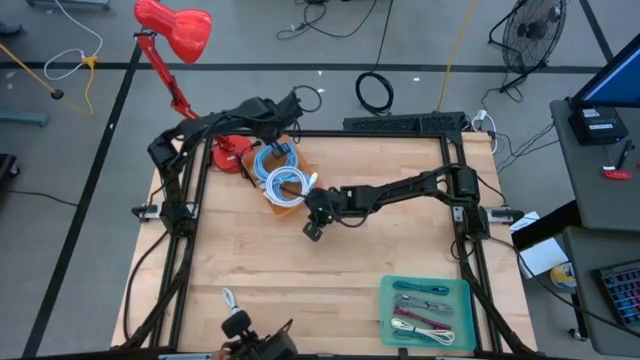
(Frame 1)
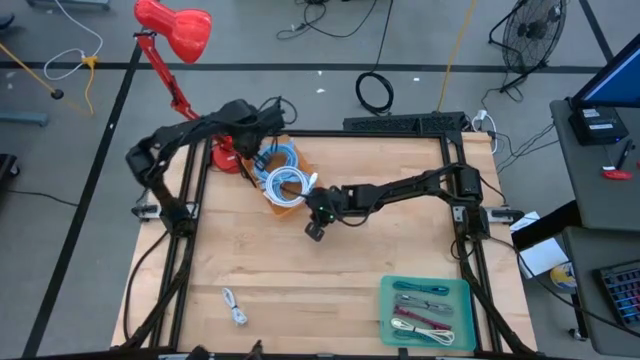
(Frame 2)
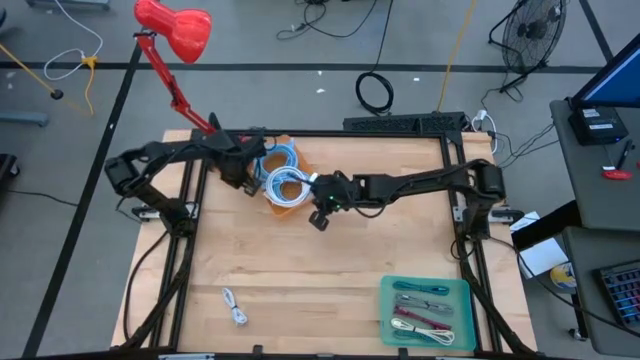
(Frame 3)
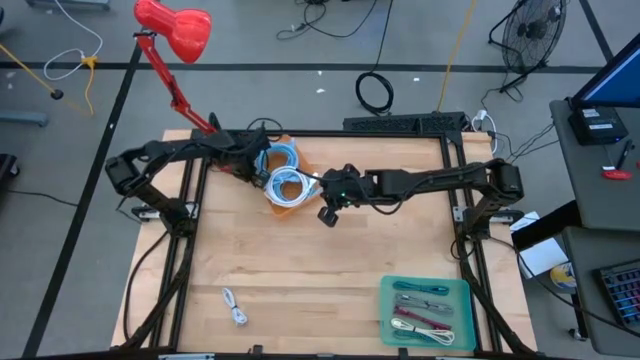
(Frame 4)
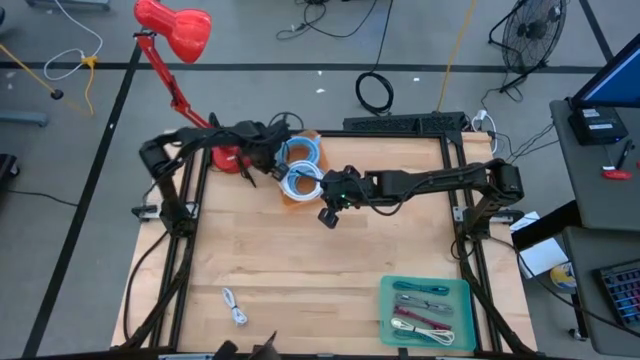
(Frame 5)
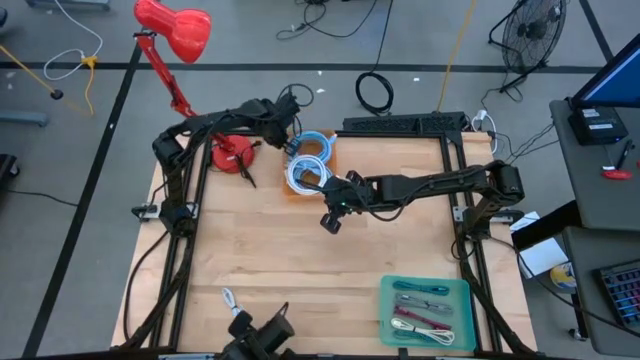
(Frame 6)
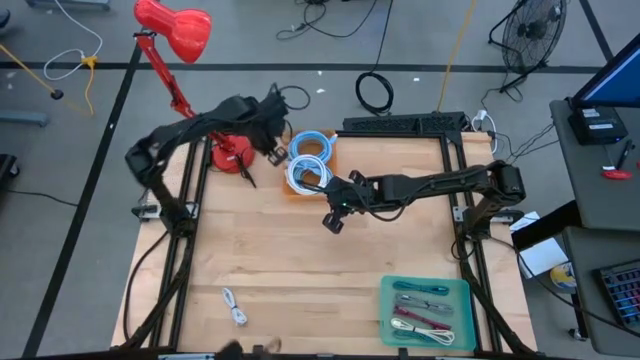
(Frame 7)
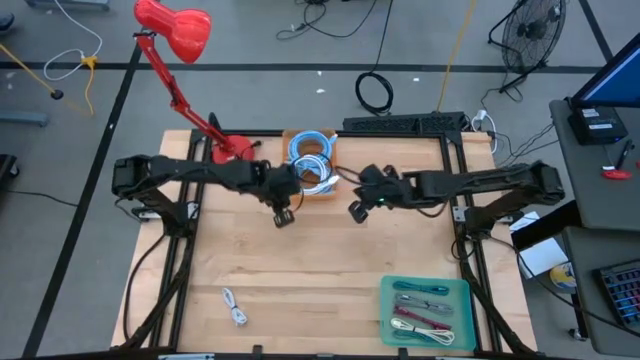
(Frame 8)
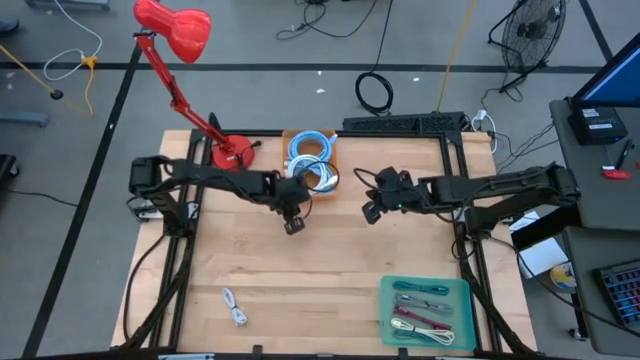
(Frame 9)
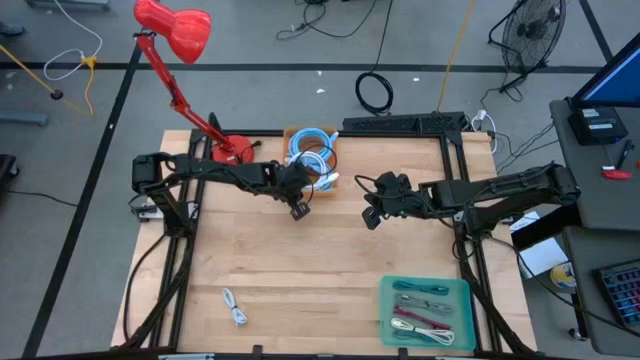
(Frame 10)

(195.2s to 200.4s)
Task: Pick & Place USB Port
Adjust the orange bin

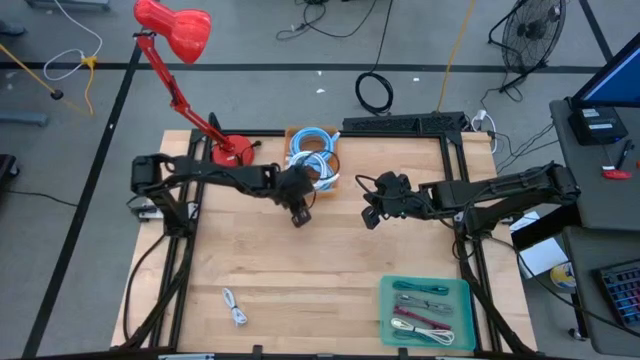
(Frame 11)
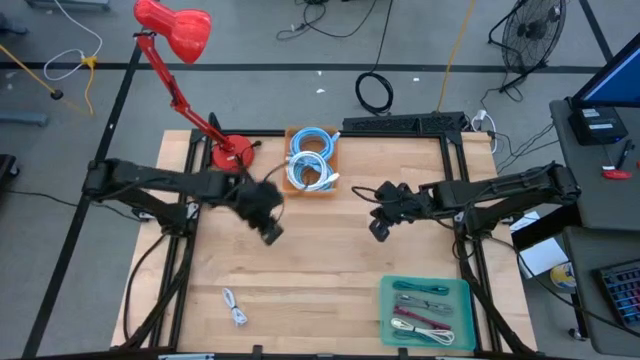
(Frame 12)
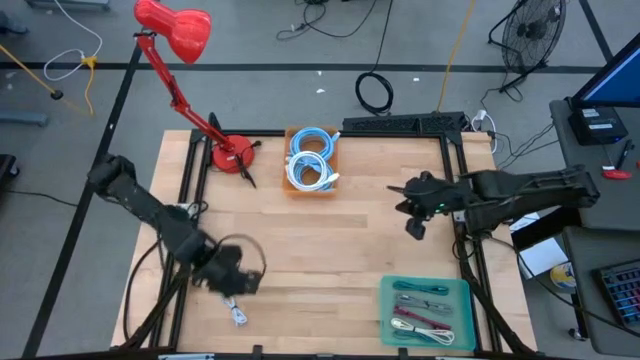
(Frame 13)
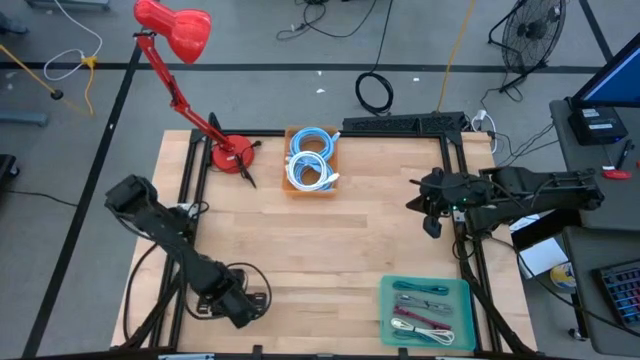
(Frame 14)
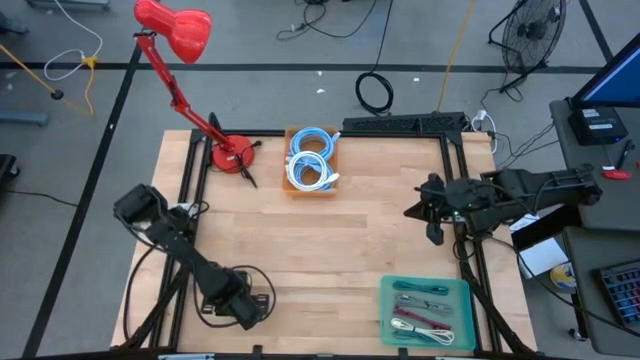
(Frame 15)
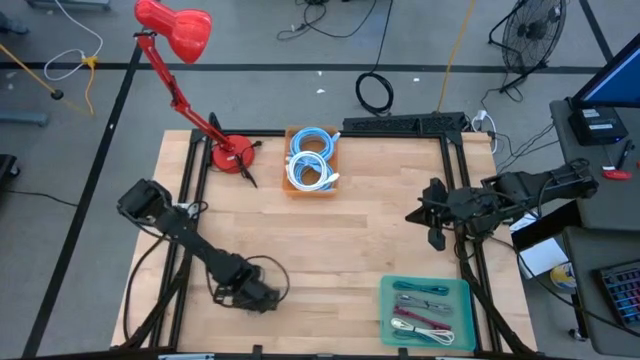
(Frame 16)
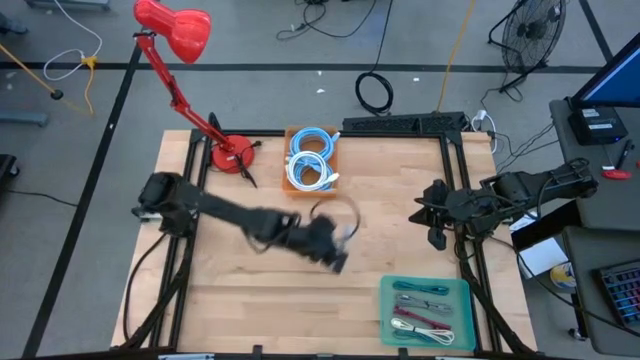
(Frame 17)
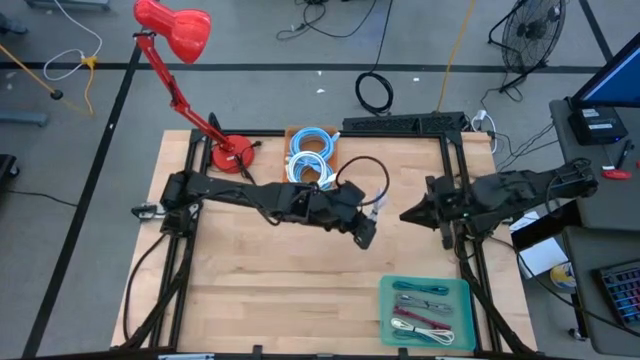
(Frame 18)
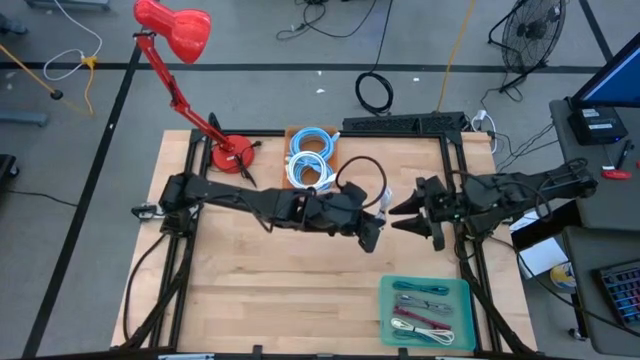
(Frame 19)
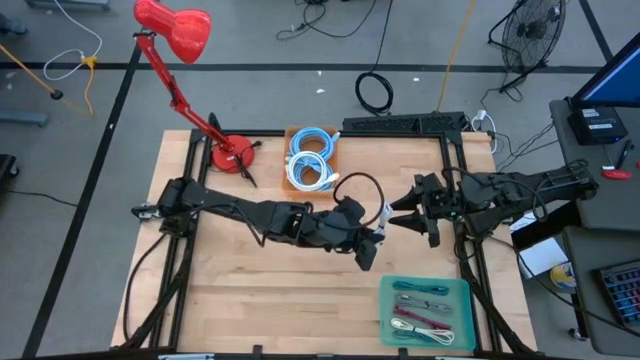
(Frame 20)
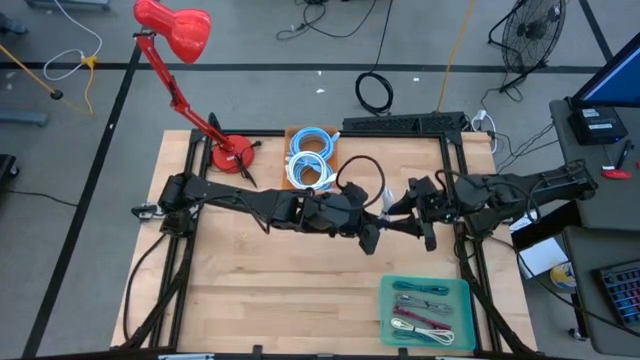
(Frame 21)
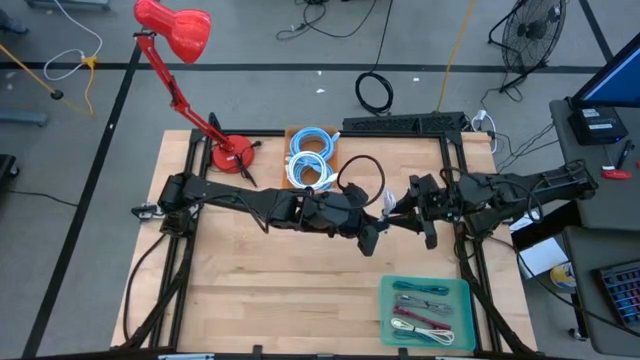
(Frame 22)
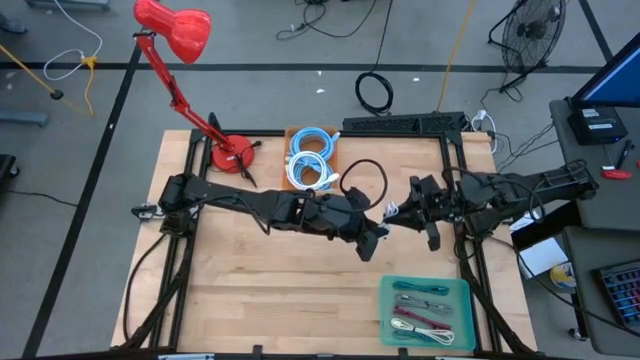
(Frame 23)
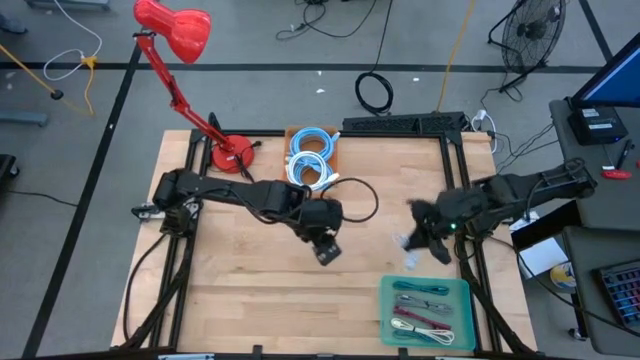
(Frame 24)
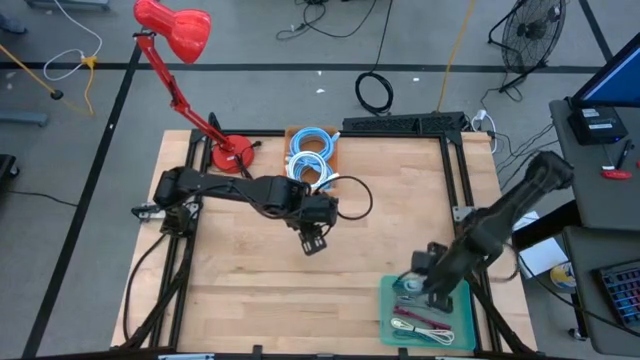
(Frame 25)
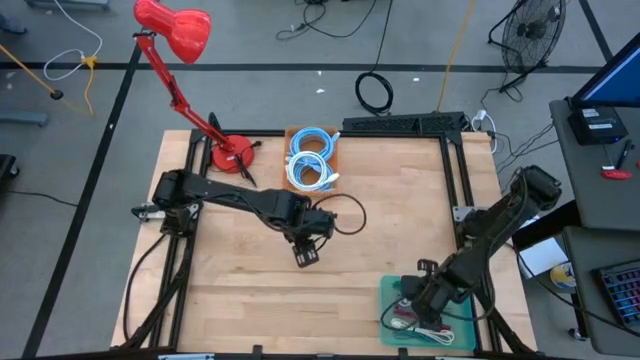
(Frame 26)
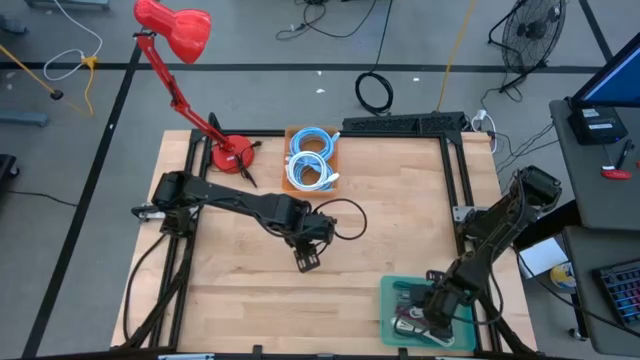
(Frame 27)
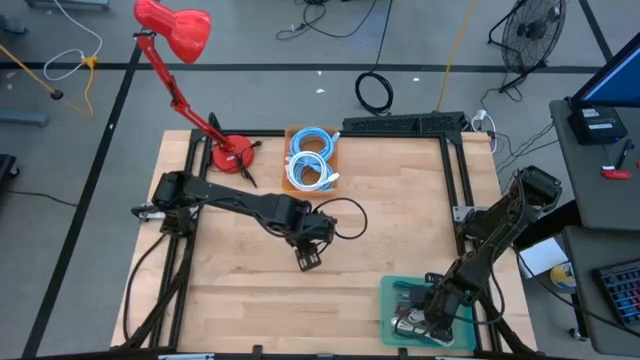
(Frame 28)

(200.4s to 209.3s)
Put the white charger cable into the green bin

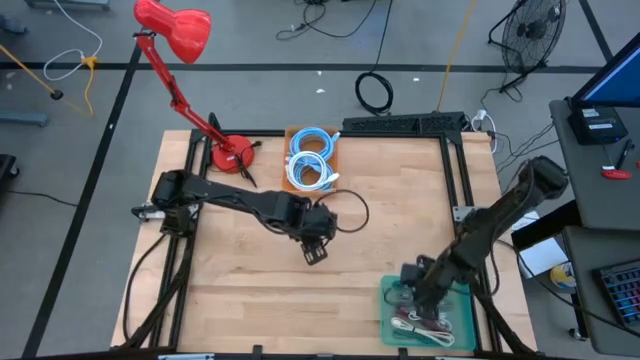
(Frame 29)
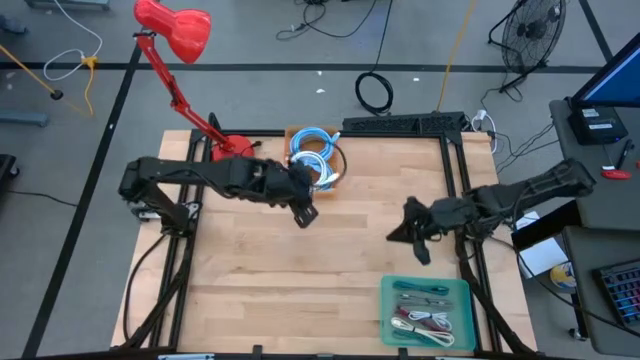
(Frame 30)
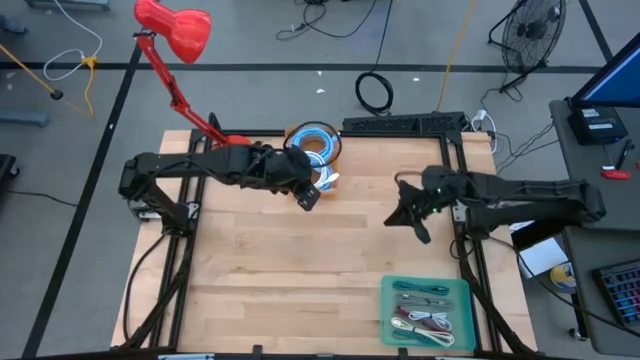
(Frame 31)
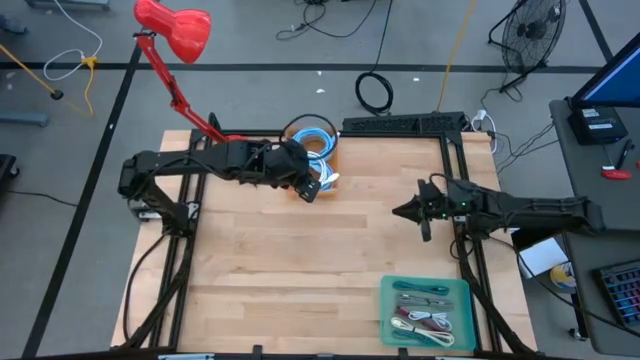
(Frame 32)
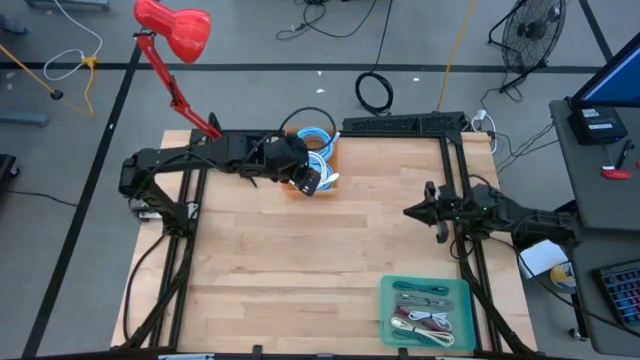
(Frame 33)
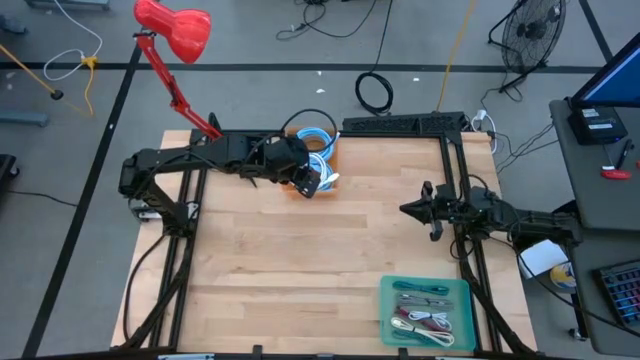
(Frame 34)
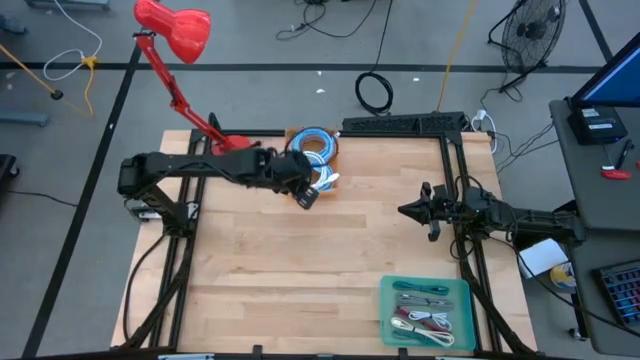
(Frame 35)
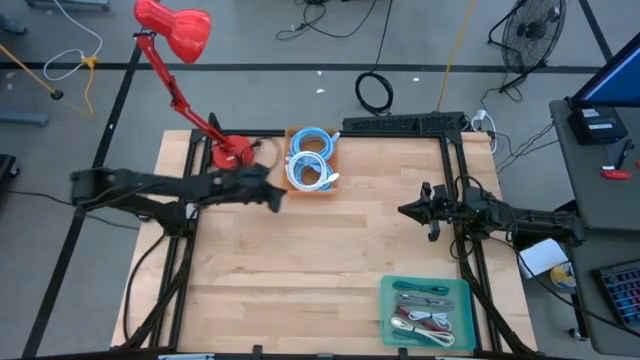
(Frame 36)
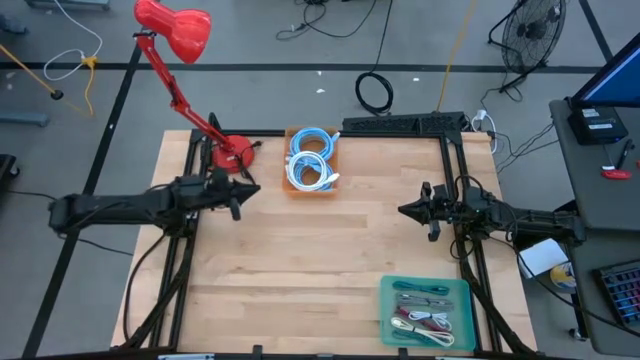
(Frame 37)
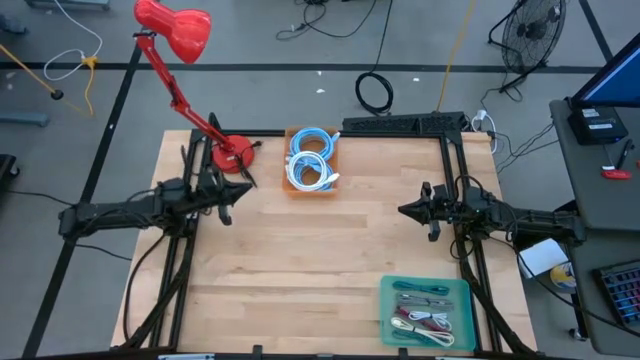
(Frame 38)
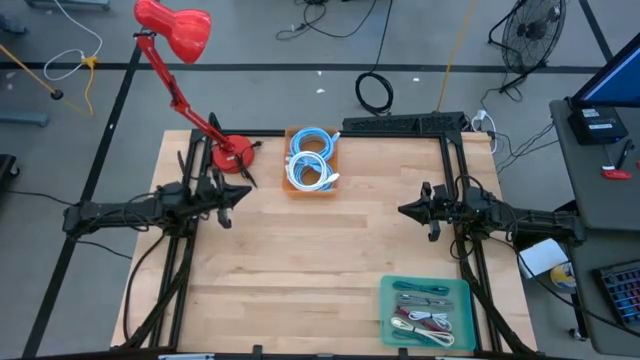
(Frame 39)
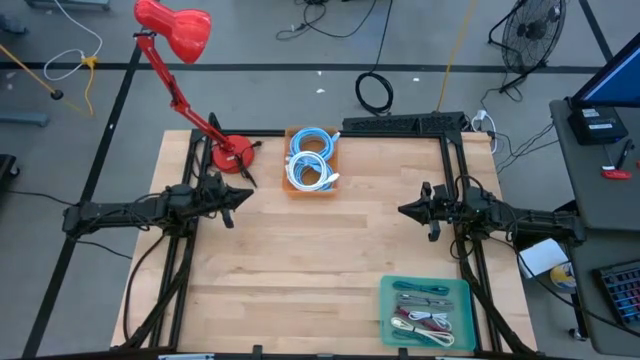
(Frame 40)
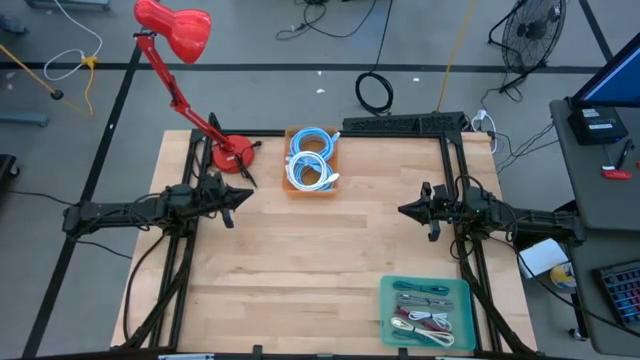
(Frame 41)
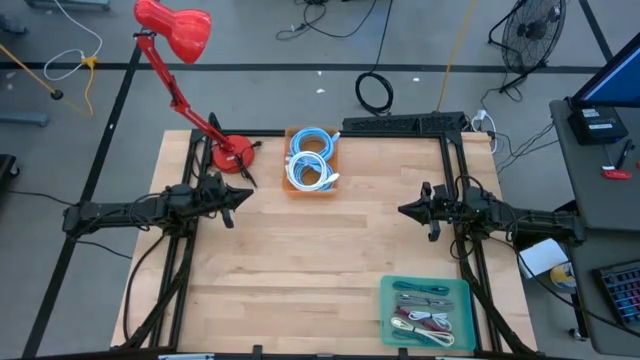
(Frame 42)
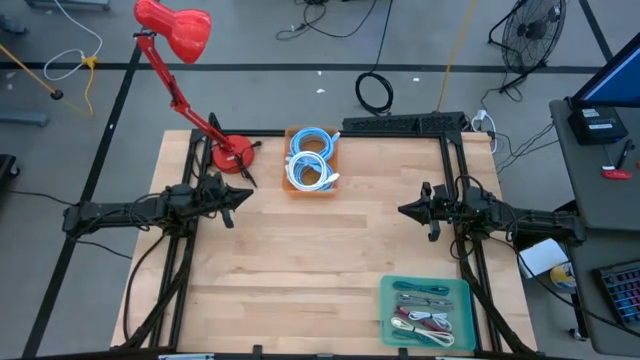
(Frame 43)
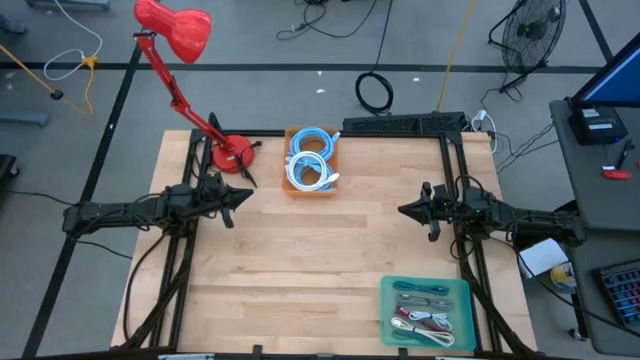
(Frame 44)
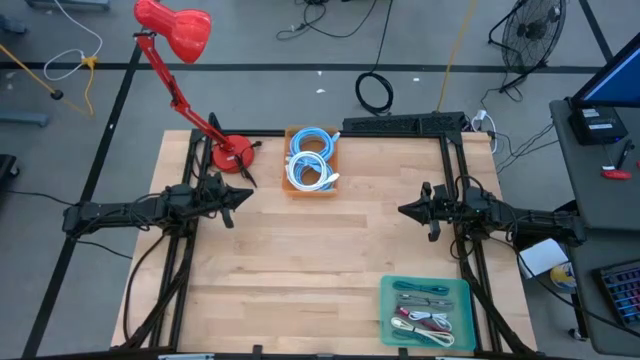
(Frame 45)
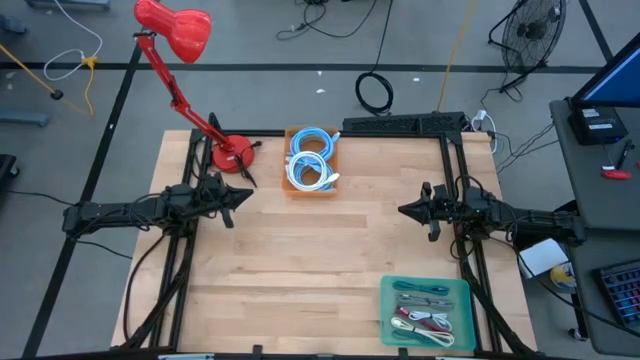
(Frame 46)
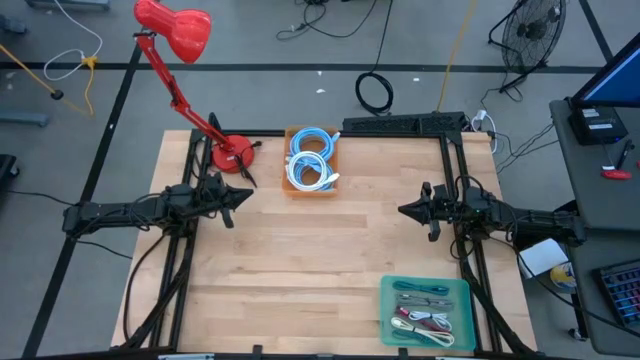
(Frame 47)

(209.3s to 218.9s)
Return to Home Position
